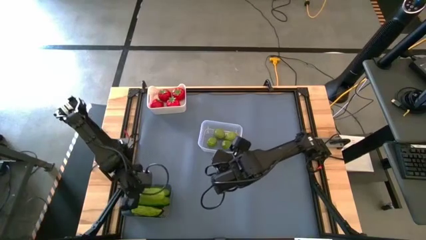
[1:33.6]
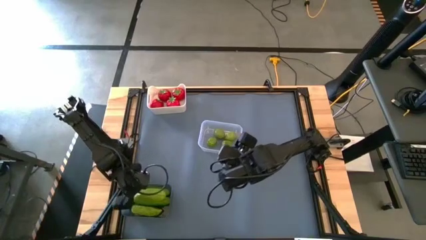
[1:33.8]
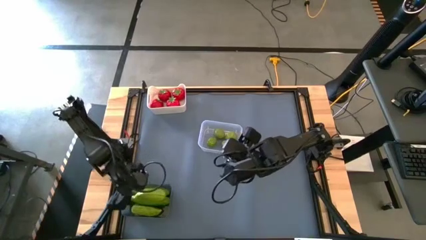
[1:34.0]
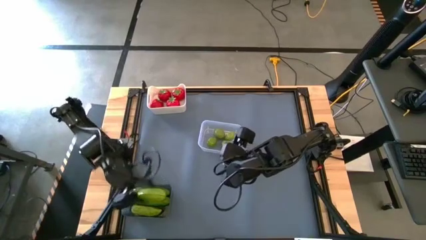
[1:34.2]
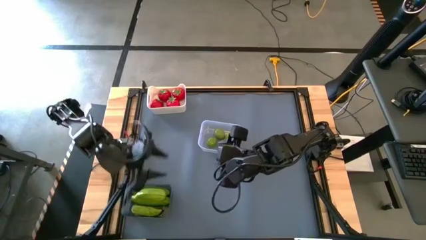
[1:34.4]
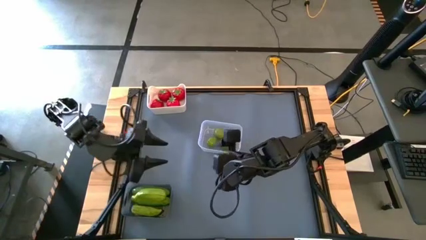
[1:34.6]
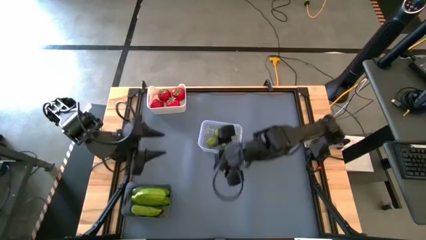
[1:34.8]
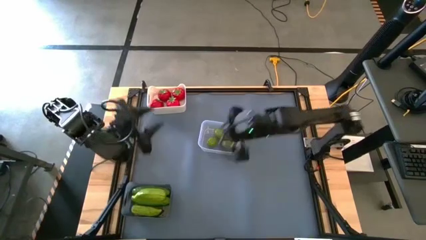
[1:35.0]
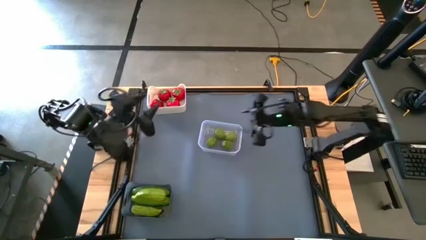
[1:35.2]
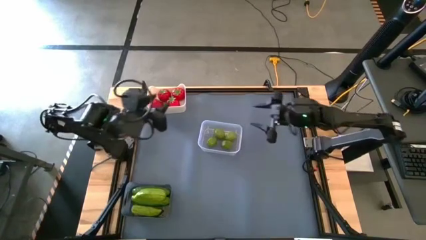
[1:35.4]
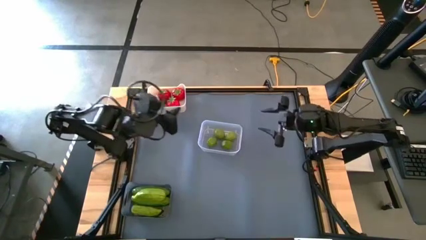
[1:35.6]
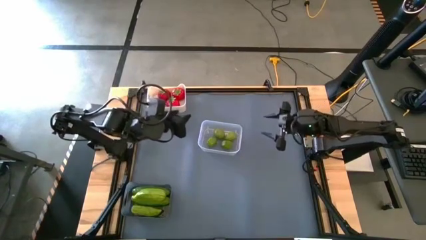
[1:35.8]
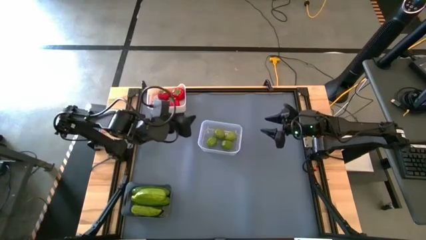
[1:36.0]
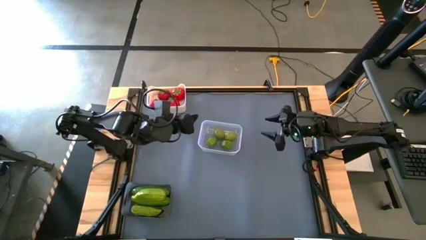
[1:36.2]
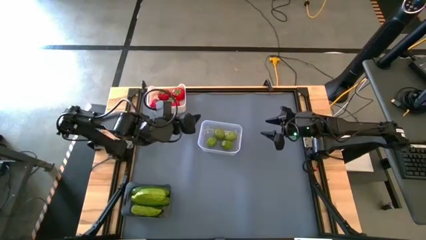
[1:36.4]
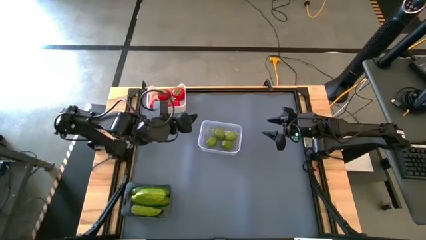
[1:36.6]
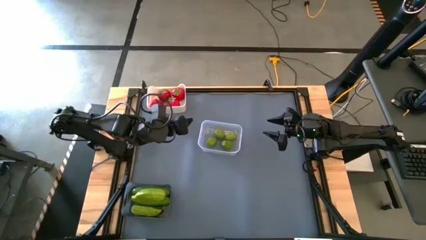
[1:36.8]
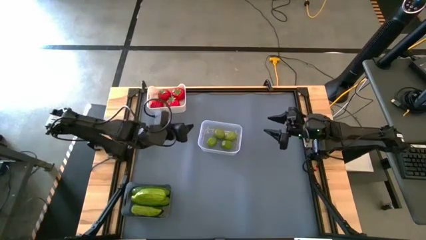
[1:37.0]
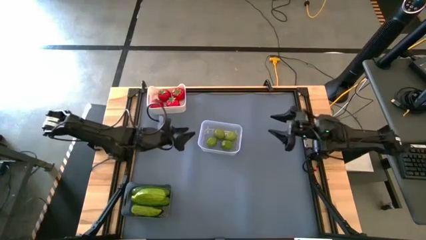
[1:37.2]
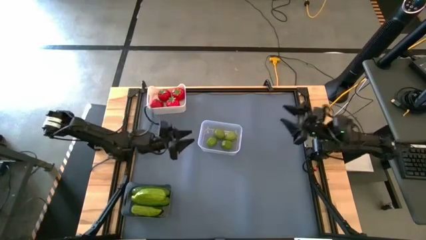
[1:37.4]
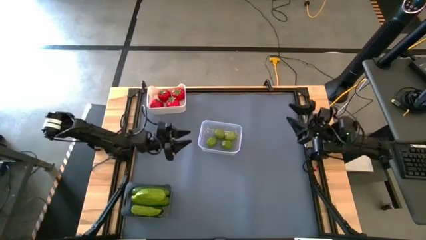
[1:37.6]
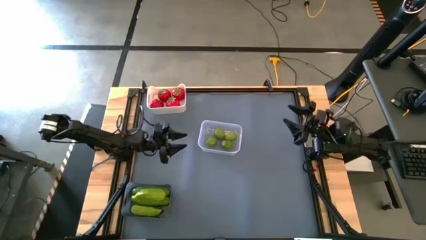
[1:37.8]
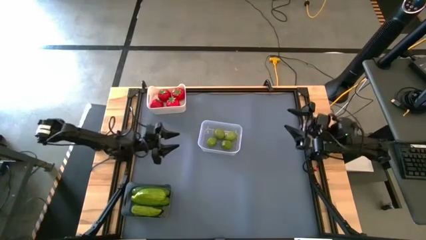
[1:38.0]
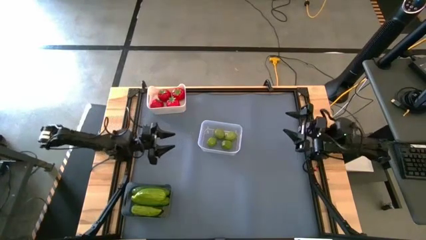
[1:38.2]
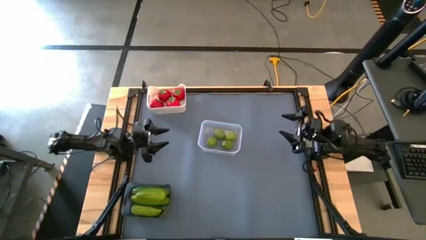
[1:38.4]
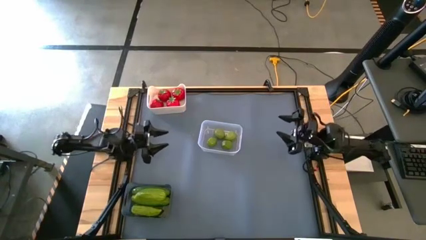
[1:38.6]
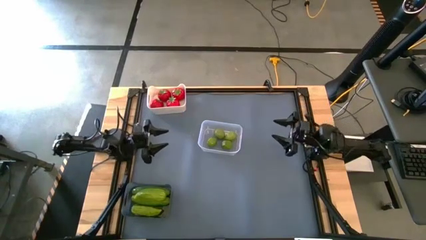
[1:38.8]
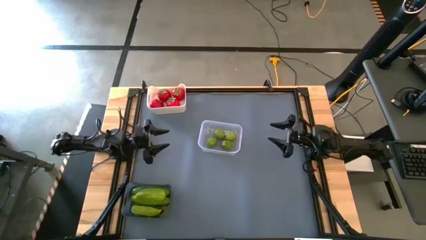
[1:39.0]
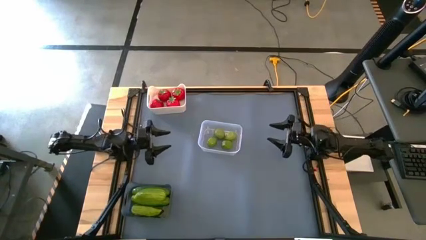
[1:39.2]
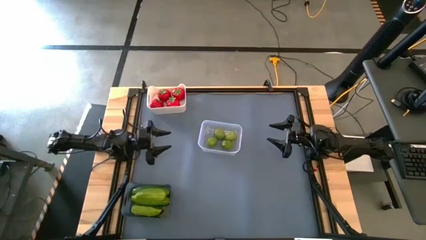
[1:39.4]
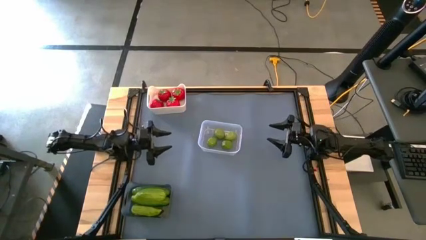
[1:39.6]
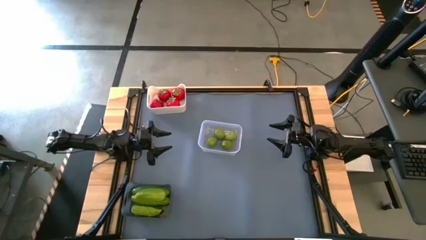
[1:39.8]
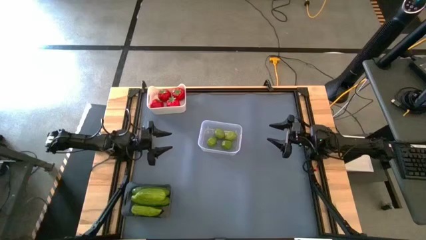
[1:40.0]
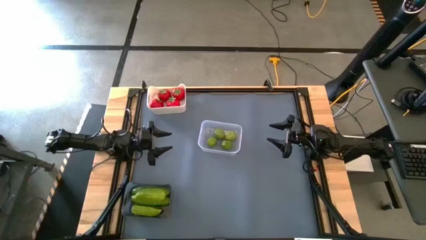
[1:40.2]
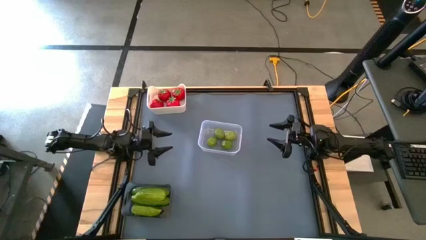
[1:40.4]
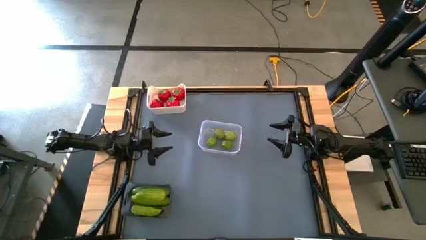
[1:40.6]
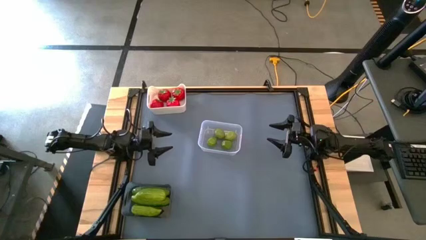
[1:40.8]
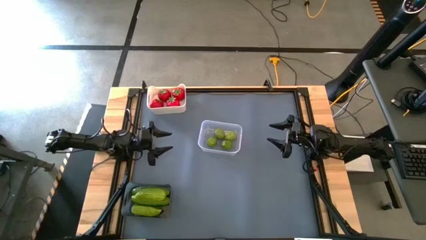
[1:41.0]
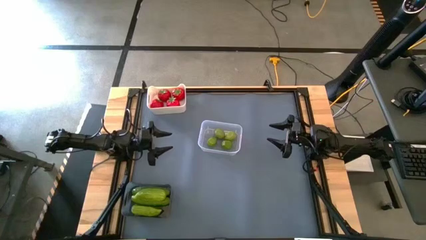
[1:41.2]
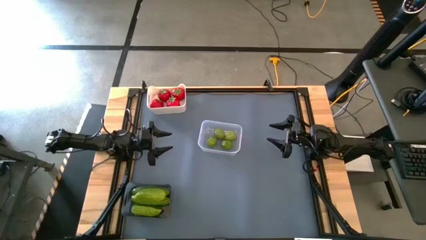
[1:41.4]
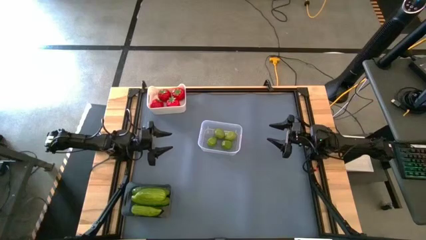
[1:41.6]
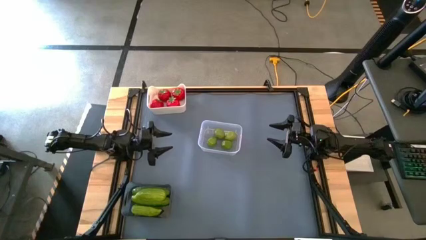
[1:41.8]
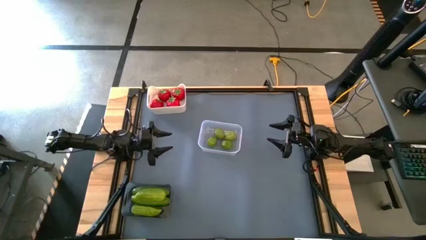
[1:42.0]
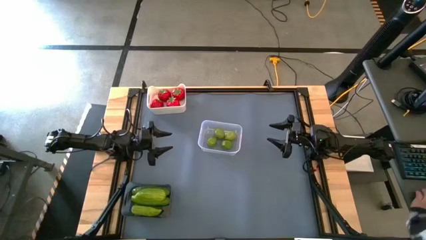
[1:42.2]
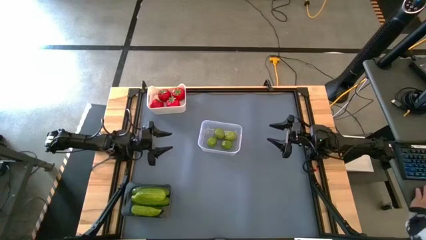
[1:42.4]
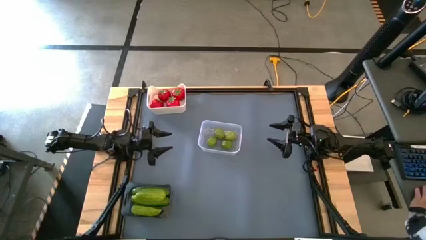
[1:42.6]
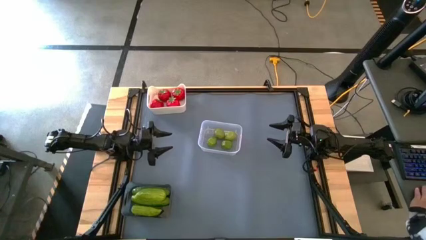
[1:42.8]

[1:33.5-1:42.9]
Task: Sort produce into baskets
Return to Home position

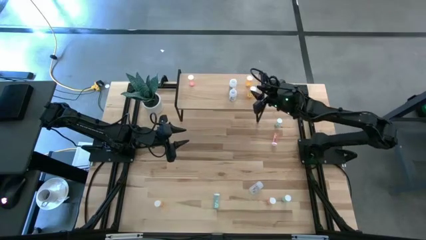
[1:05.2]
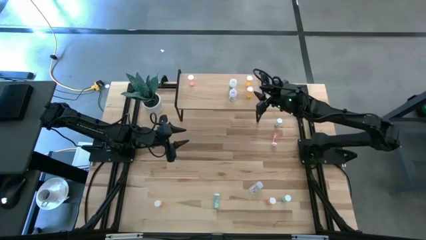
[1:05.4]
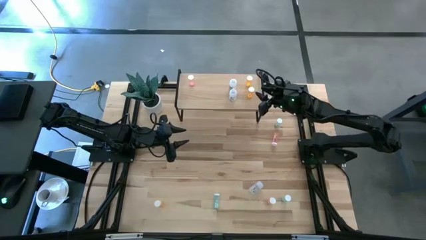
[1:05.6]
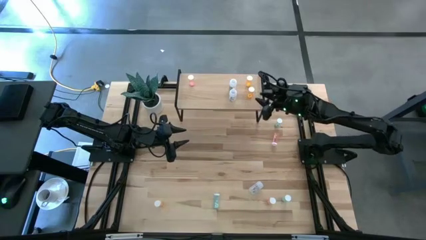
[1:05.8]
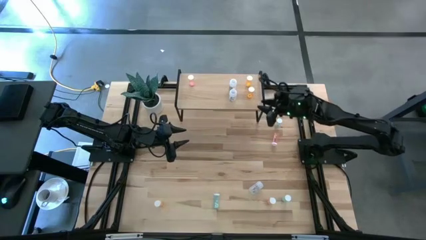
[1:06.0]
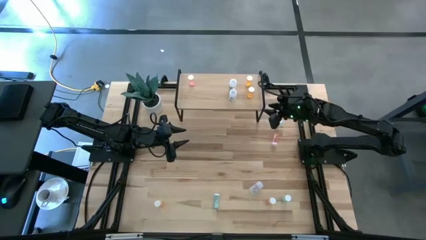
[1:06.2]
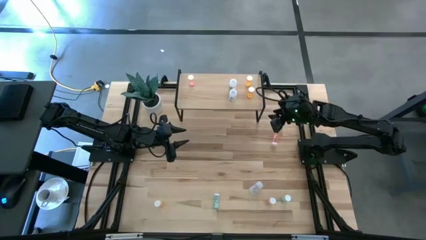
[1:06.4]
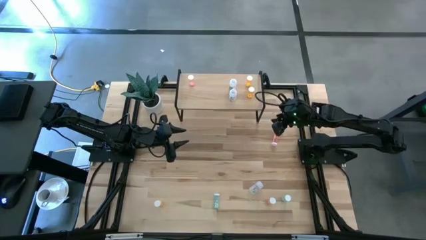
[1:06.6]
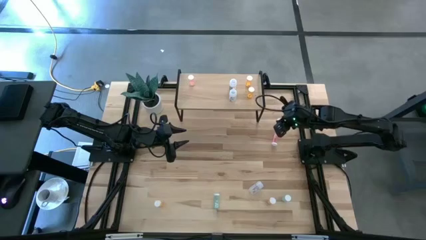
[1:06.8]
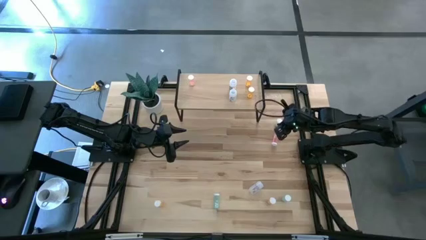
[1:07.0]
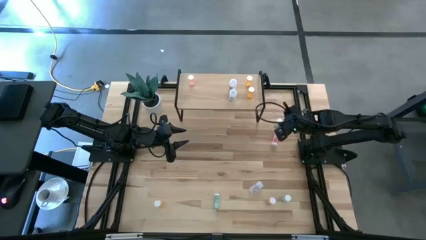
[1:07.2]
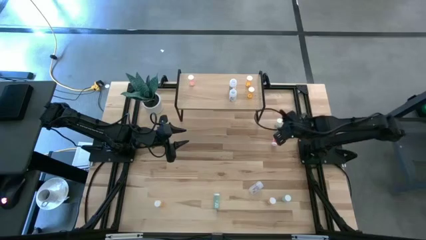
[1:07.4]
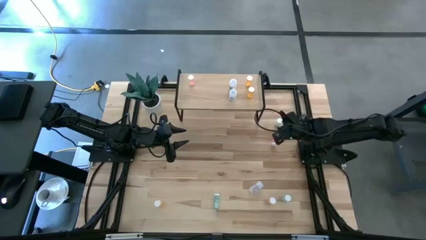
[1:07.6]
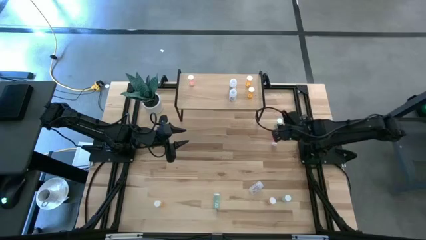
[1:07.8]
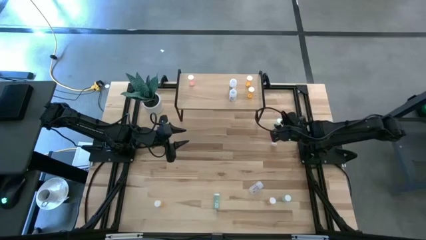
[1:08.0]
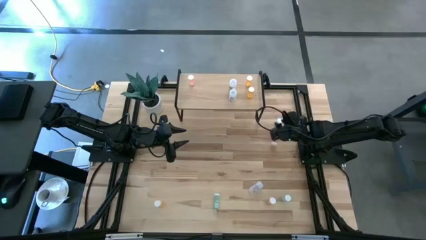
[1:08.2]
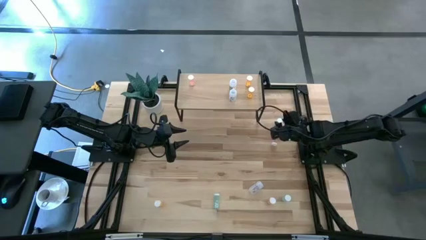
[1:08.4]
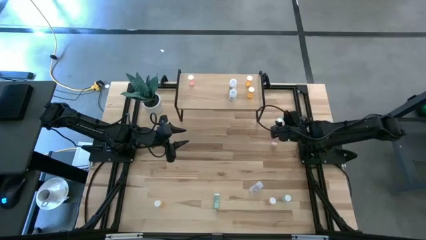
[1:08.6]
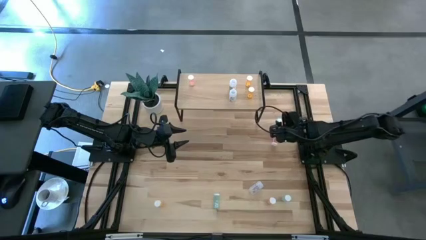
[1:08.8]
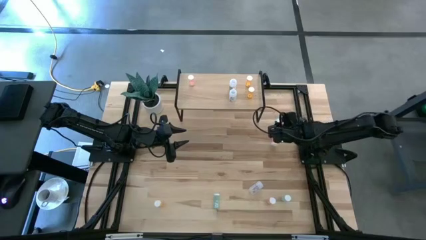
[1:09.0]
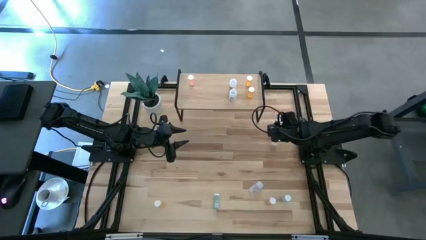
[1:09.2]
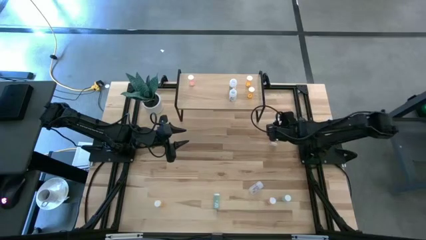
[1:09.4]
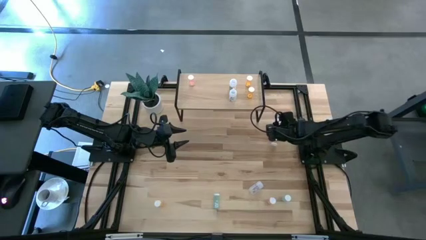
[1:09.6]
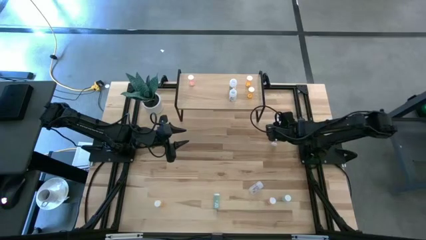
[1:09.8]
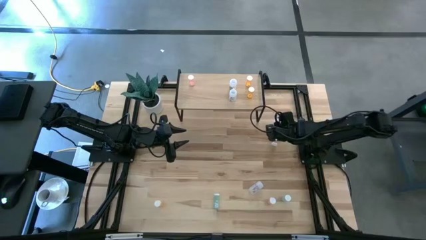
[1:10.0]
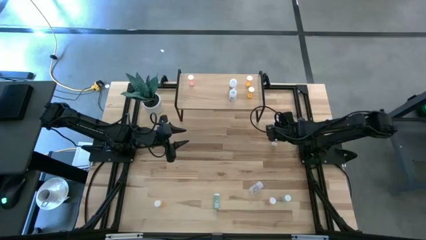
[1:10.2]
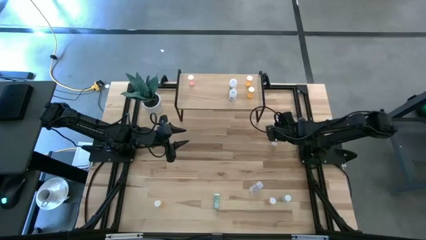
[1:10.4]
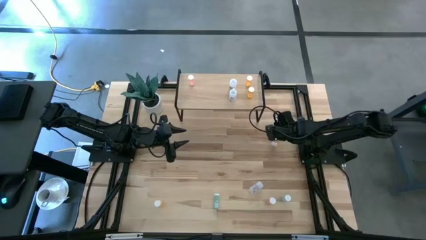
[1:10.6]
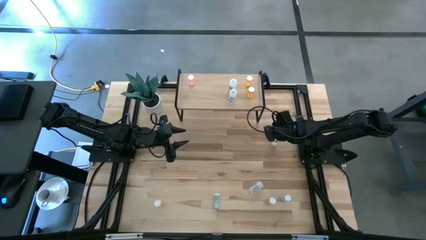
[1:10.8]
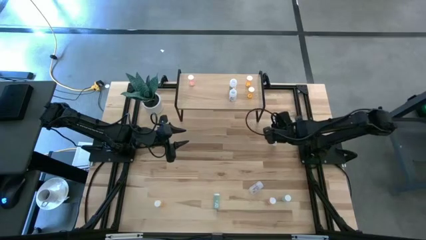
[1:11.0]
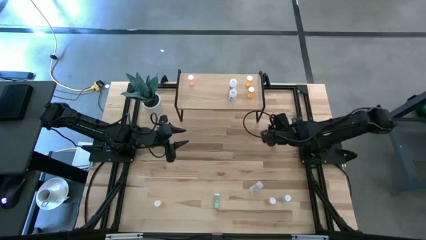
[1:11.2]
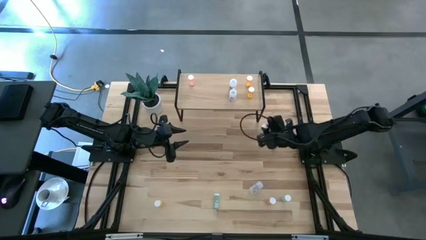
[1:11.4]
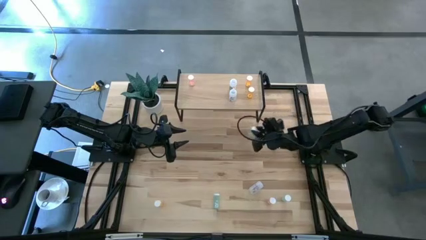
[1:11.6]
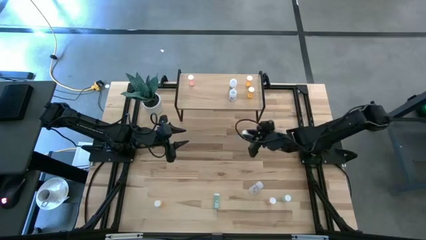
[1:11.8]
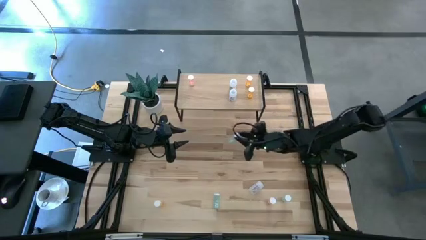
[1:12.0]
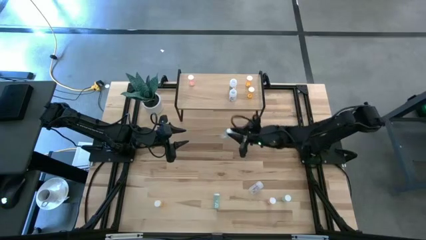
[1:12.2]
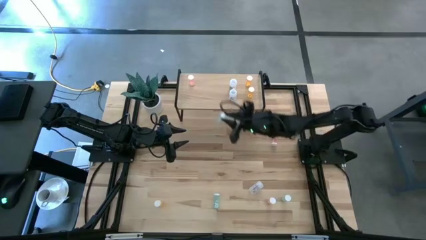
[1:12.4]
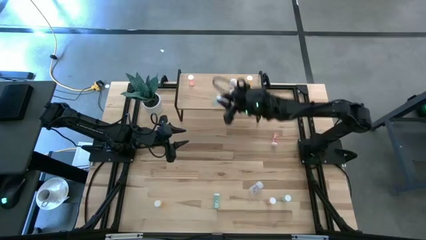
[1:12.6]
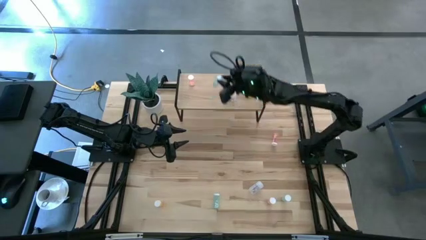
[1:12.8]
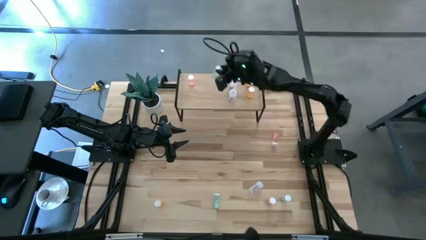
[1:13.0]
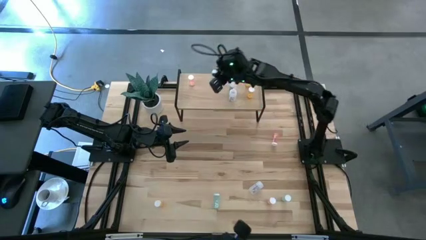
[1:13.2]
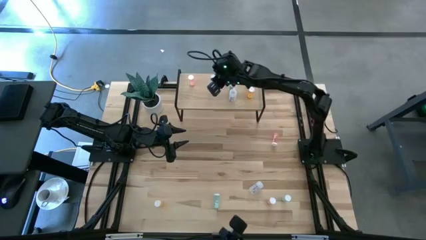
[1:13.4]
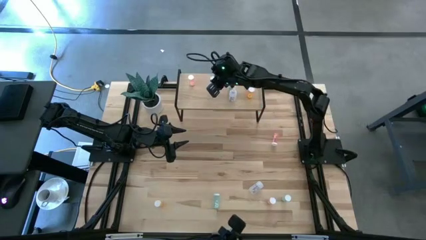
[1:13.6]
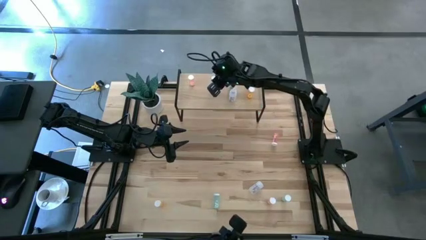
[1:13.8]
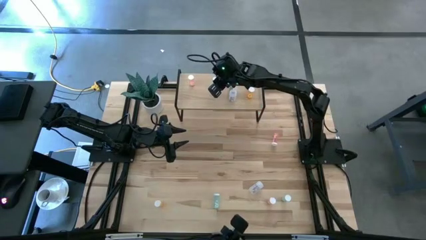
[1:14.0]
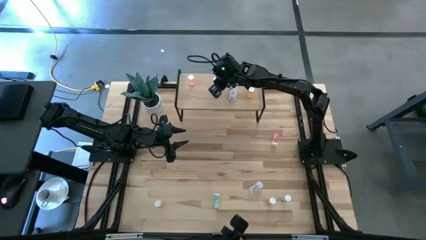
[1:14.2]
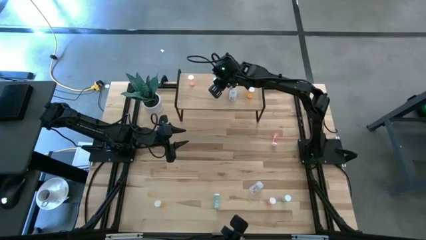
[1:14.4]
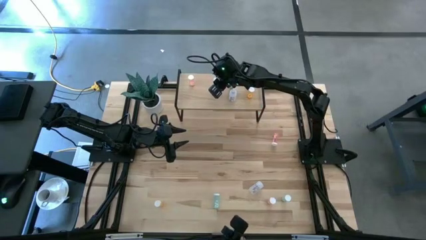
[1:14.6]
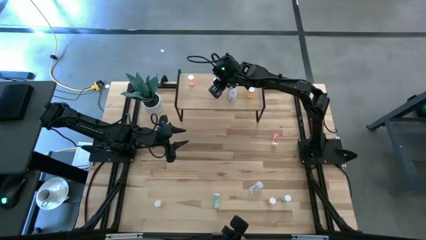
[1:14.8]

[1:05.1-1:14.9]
Task: Pick and place medicine bottles onto shelf by color
Put the top blue pill bottle on the shelf
